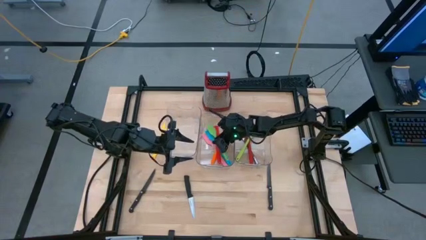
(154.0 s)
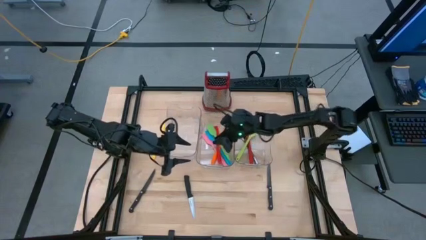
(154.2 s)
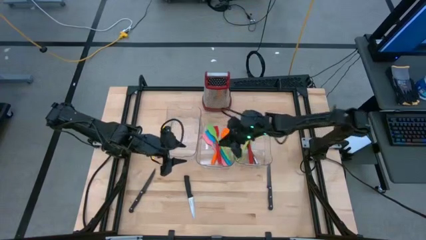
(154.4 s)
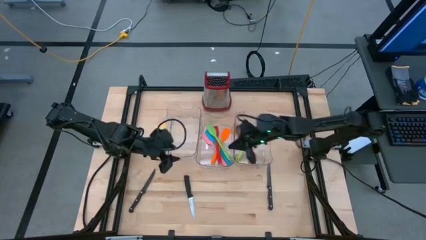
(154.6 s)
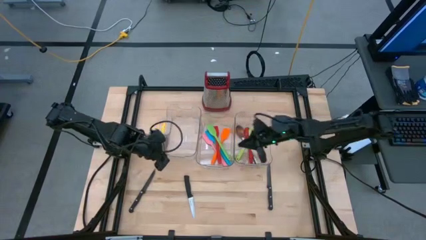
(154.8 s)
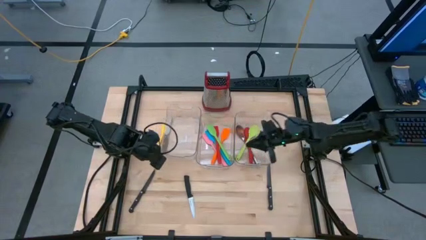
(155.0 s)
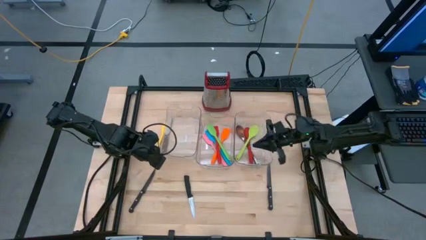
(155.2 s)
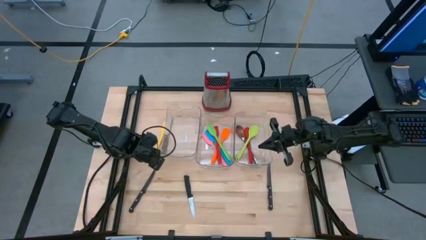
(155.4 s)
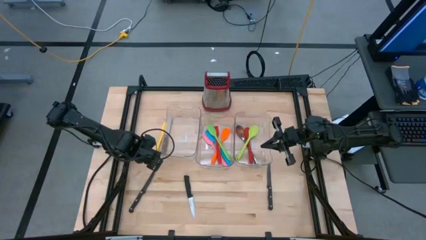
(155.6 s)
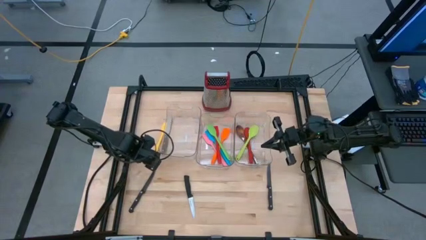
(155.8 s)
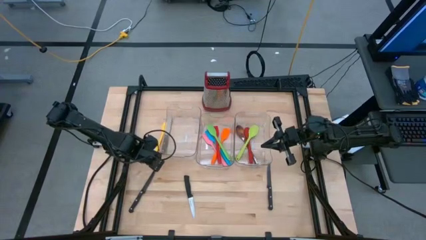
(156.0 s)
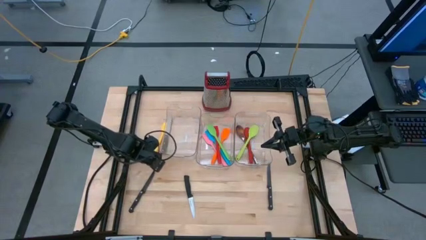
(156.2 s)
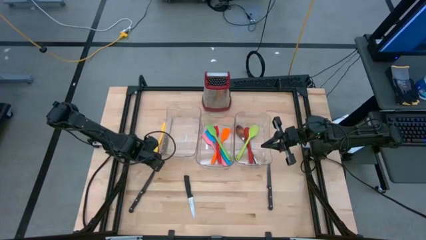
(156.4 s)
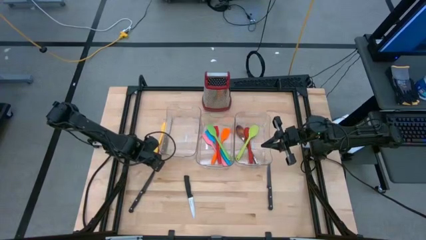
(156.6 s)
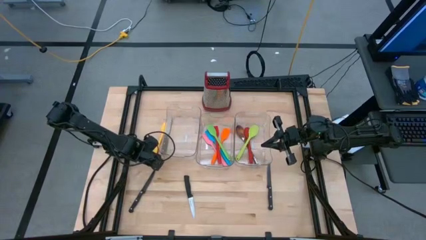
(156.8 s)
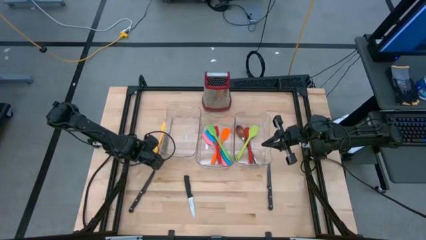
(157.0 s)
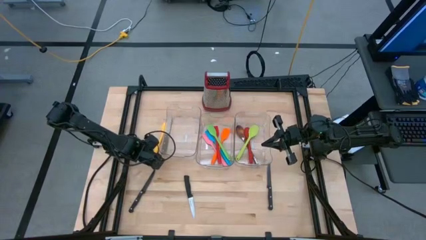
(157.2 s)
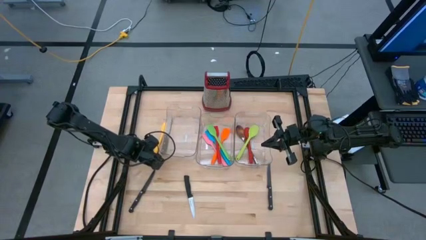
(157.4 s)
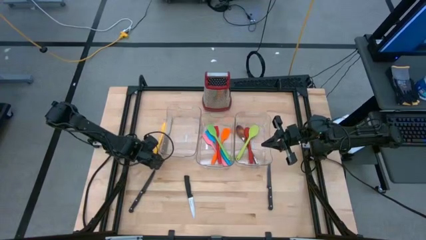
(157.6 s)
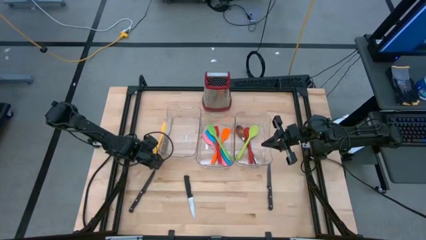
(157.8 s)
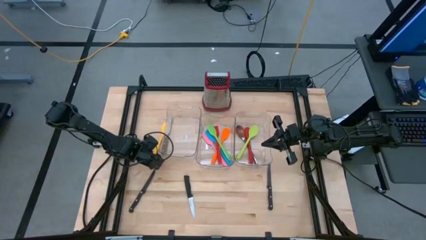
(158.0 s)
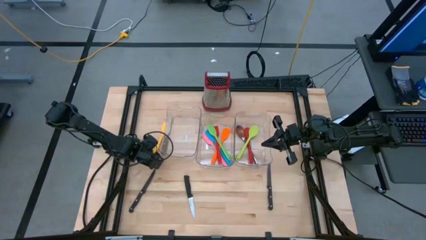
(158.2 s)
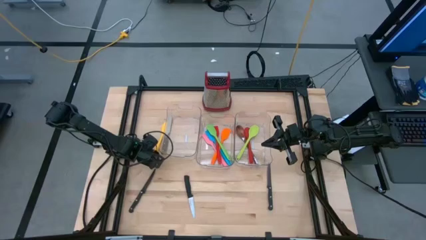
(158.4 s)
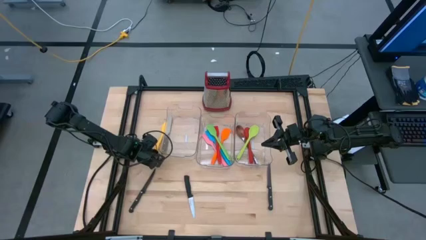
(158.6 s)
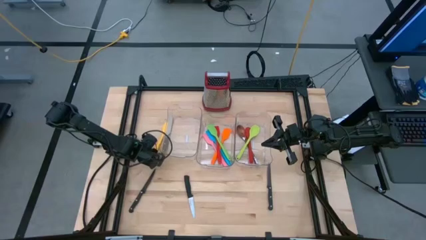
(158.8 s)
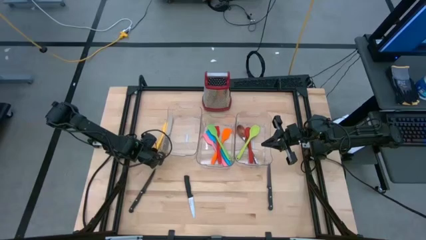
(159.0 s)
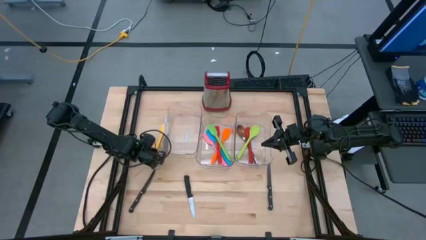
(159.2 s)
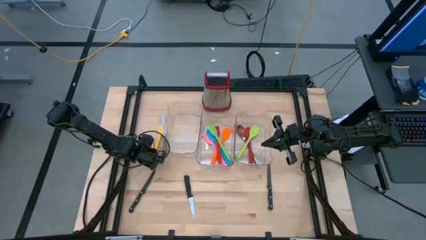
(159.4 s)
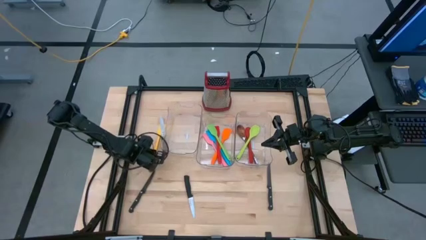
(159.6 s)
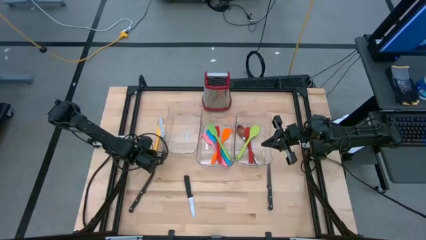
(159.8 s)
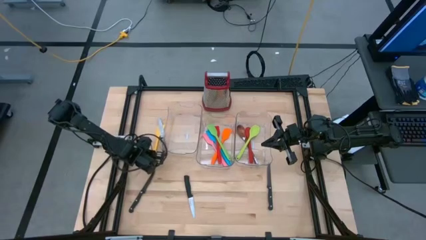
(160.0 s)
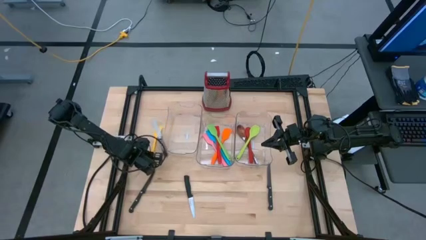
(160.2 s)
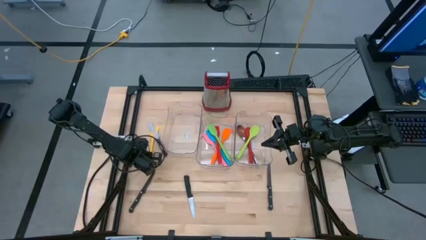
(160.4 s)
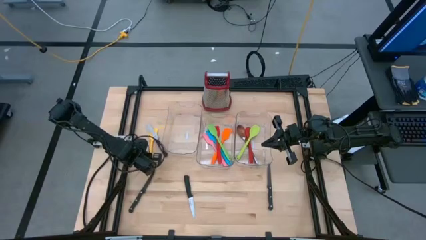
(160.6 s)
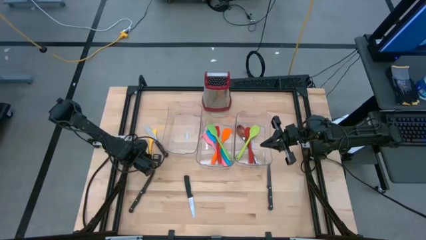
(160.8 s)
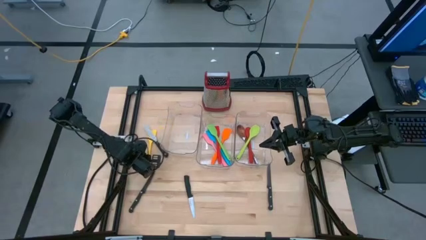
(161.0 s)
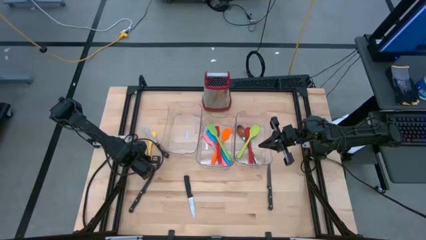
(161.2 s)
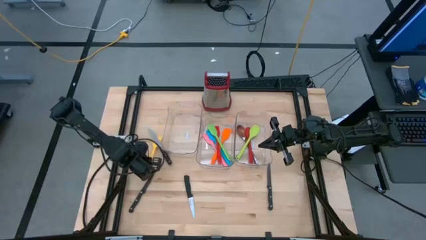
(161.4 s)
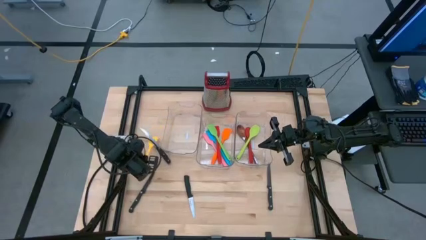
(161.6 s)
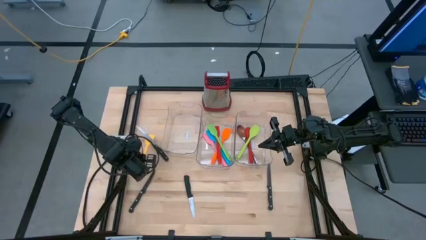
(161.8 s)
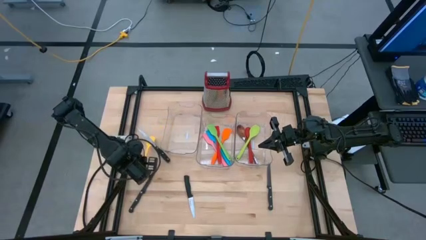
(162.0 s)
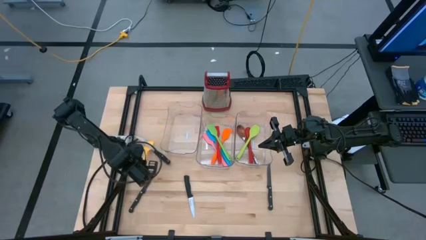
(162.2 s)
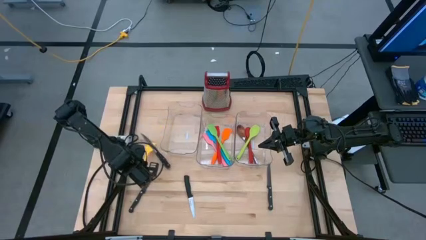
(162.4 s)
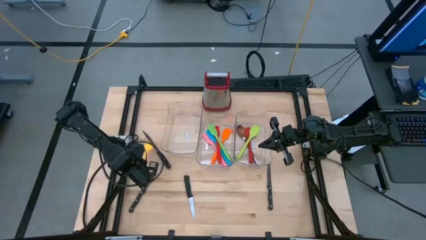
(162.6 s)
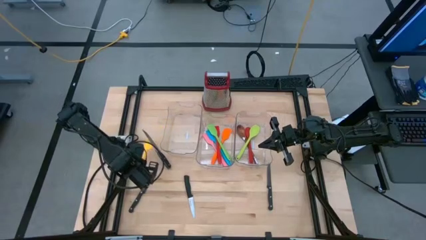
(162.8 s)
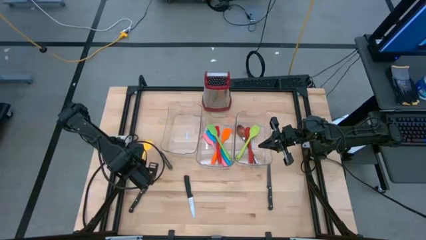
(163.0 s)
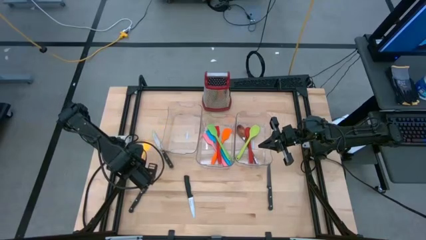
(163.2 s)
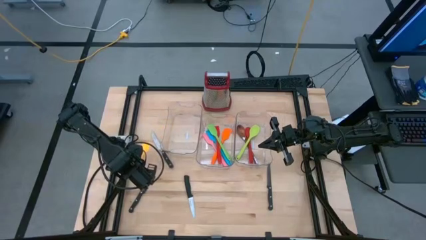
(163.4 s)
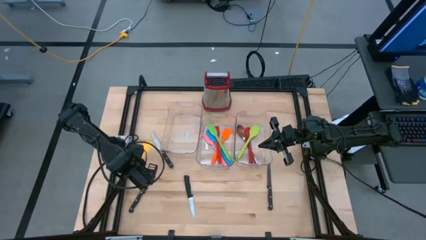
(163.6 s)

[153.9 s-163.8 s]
Task: Pick & Place Kitchen Items
Put the yellow spatula into the middle transparent bin

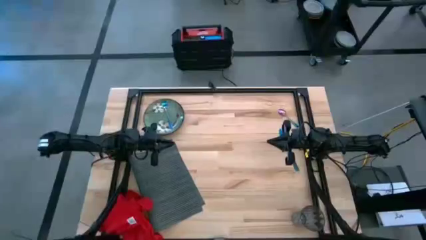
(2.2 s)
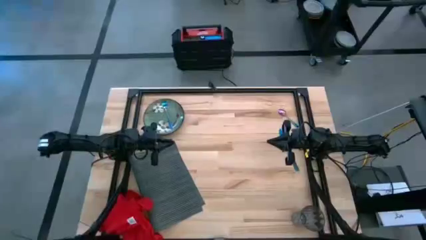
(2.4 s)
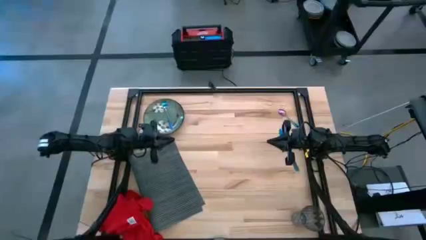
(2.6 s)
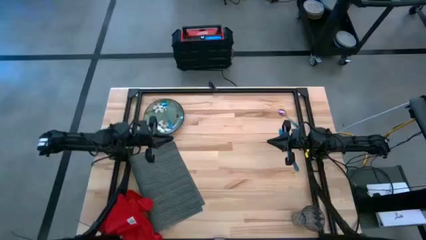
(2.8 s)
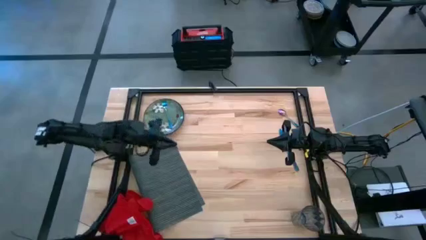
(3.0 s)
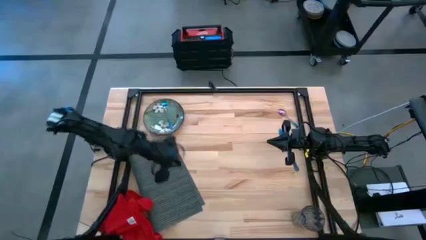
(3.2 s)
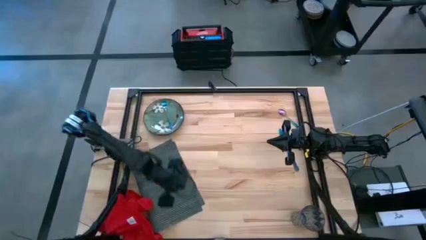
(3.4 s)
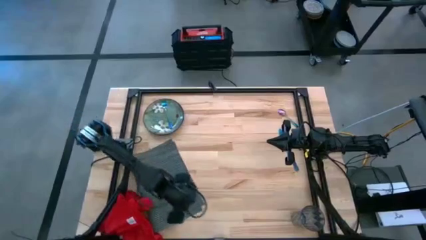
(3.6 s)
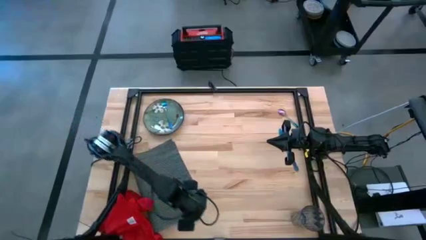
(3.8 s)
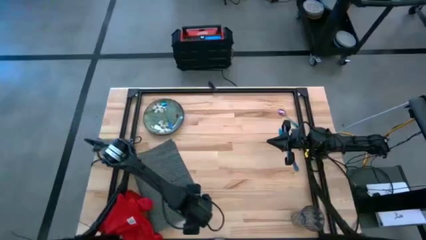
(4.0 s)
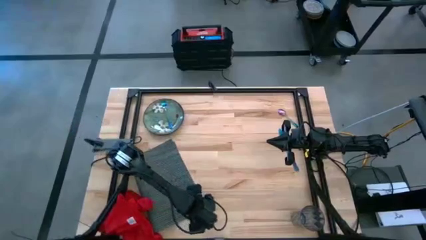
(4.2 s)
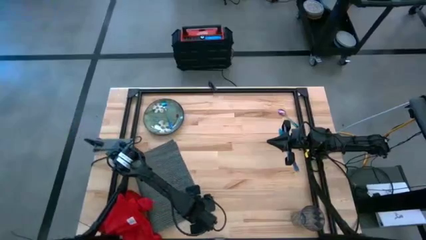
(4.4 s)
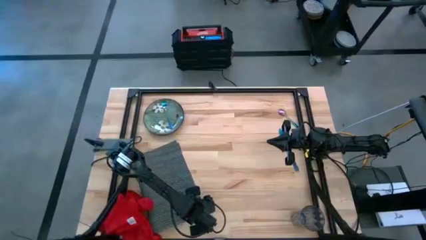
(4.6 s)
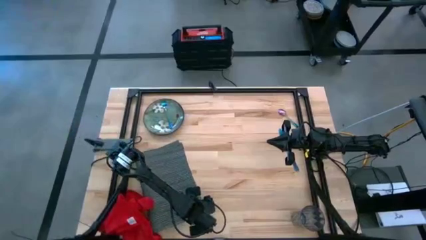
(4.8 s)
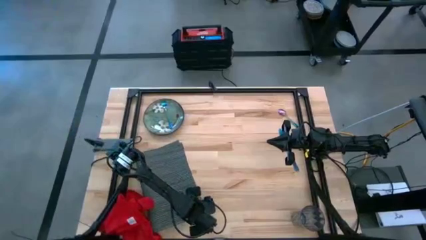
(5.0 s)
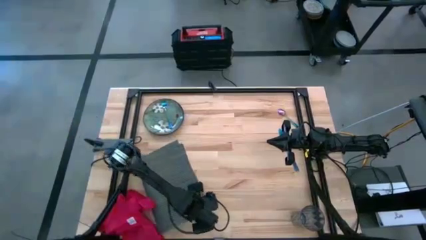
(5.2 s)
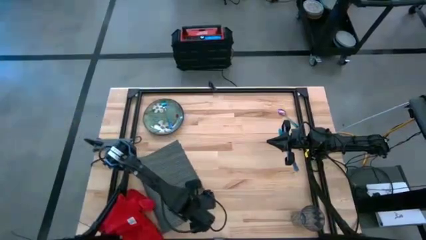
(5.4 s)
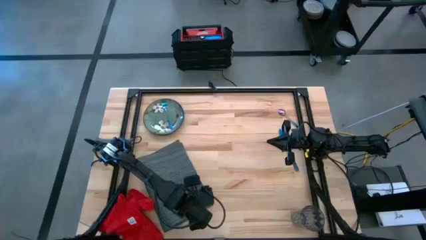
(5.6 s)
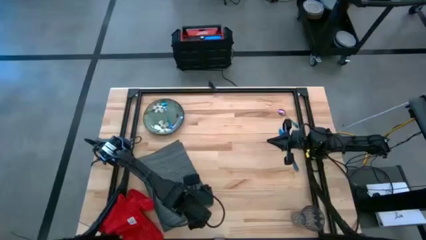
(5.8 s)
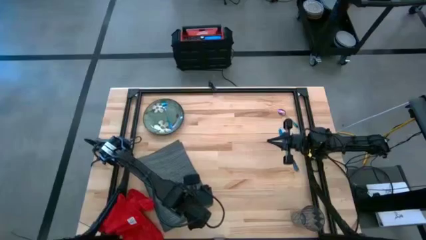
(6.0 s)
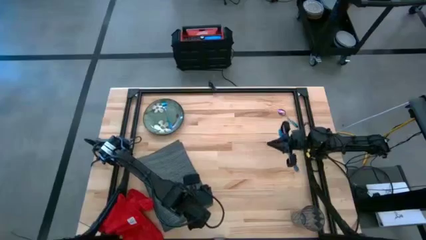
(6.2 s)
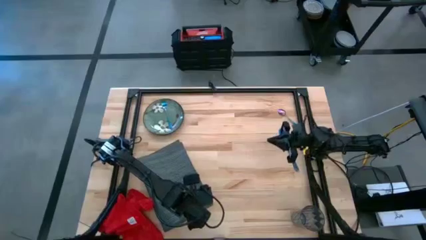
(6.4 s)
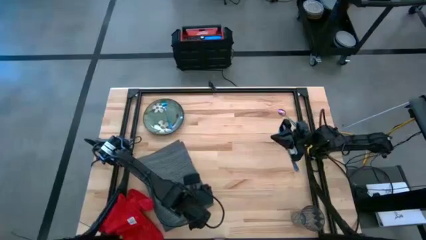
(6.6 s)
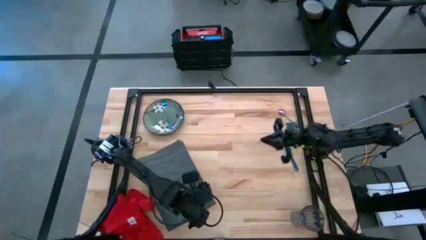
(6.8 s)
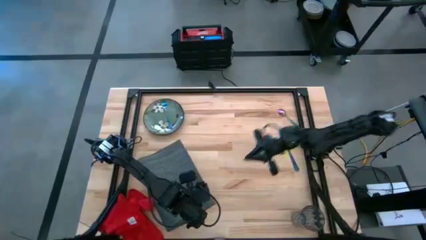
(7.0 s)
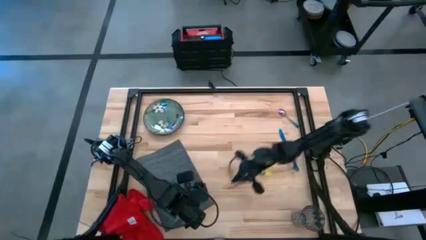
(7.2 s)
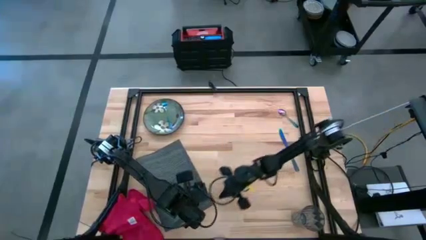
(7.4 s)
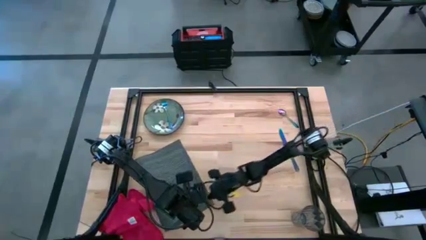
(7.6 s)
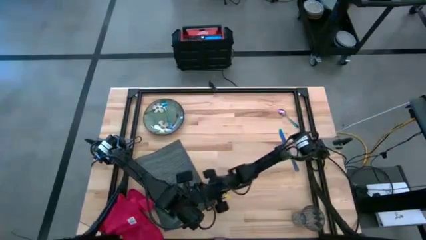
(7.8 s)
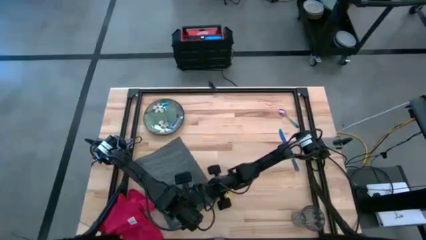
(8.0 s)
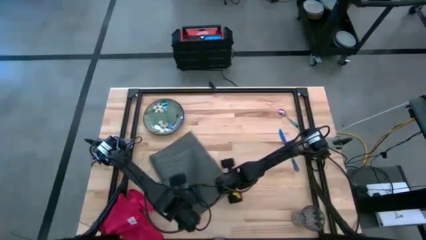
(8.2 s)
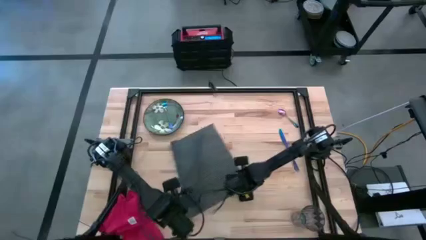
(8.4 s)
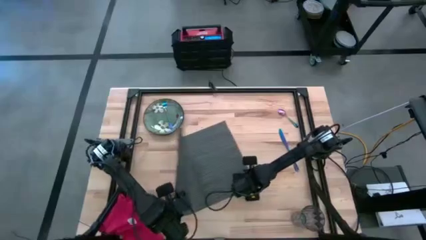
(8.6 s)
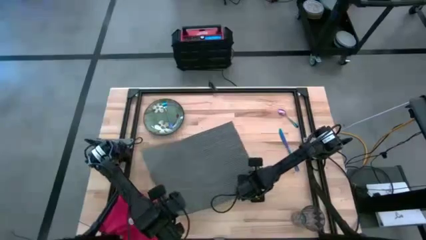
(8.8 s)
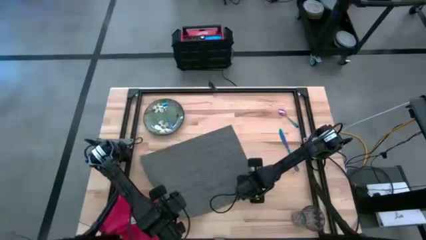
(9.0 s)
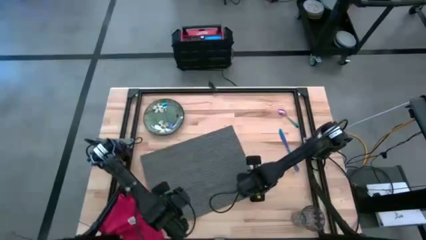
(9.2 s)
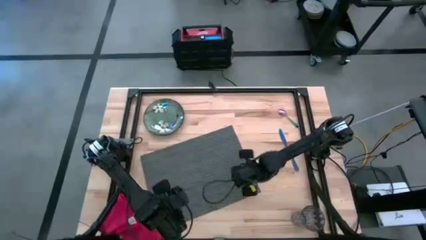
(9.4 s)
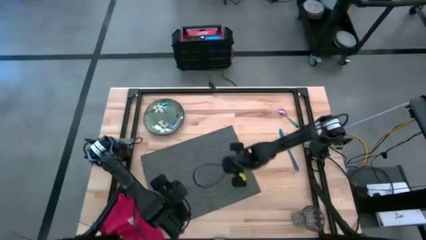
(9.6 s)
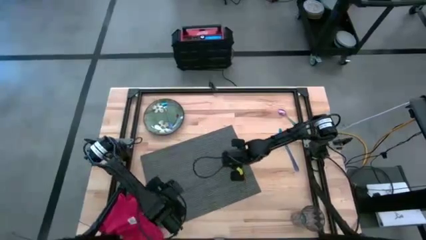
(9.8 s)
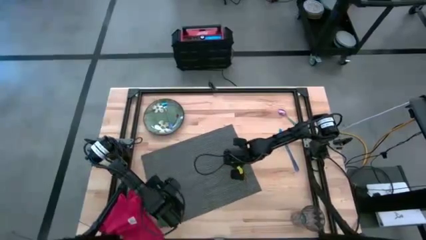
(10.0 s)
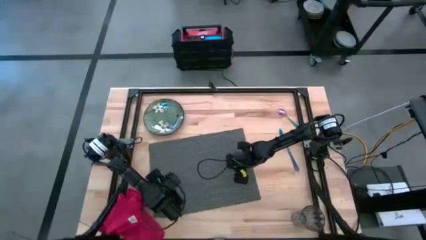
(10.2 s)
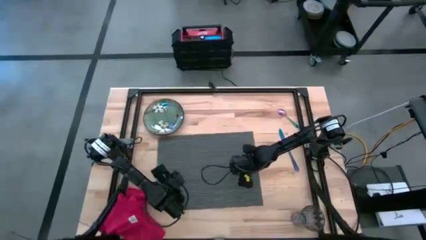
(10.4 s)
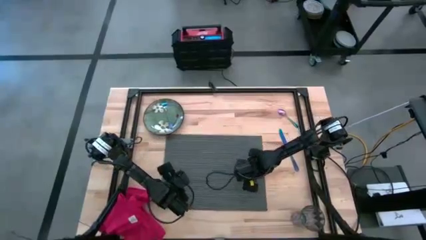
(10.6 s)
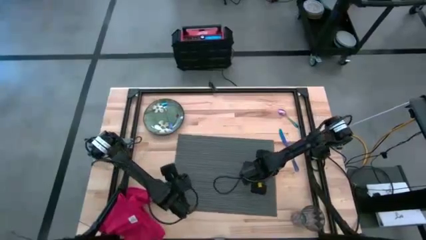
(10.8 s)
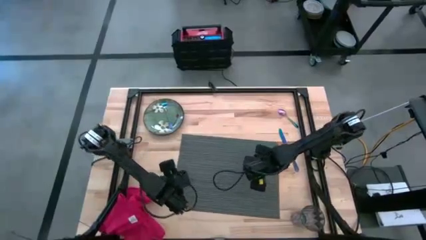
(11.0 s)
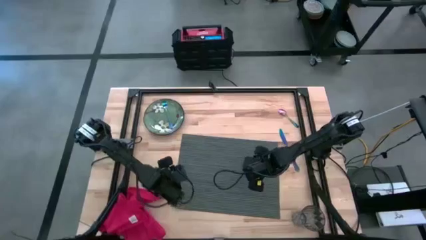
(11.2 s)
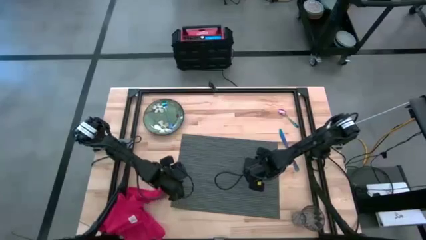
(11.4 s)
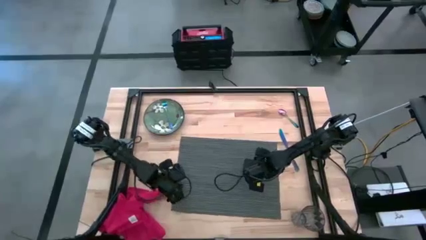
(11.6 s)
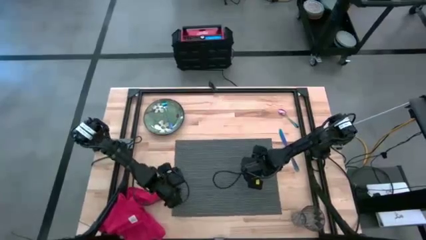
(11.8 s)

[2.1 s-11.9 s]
Task: Set table place
Prepare the gray table mat on the table
